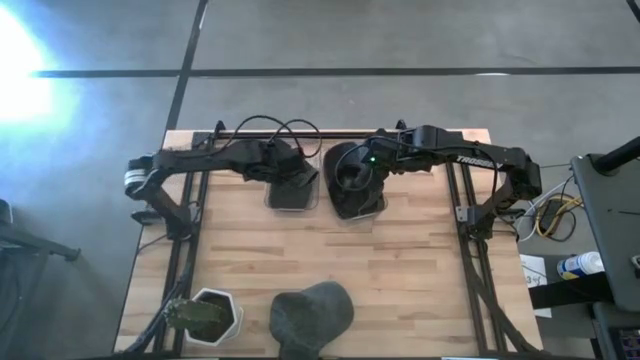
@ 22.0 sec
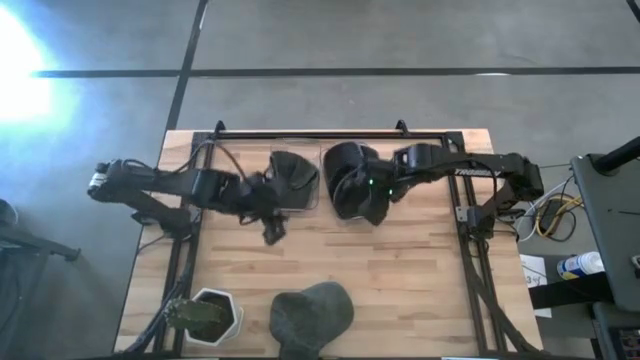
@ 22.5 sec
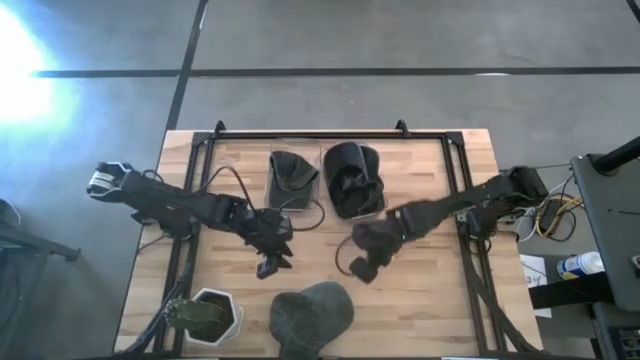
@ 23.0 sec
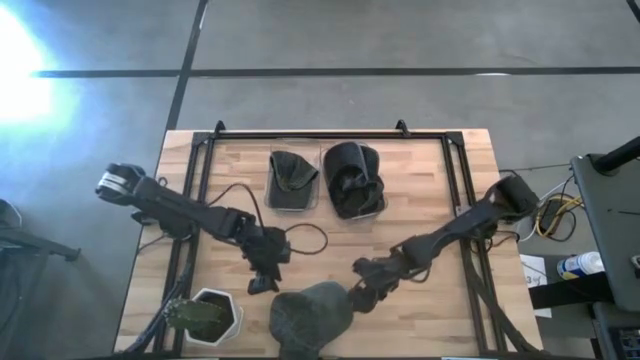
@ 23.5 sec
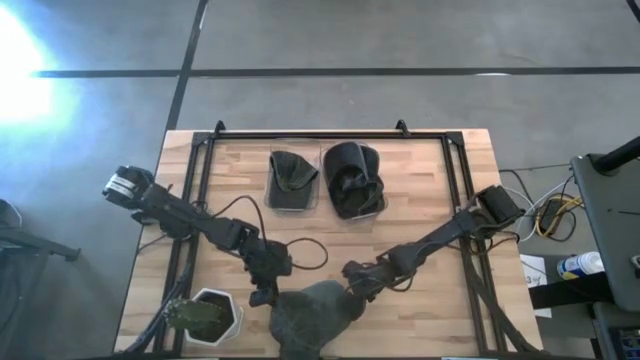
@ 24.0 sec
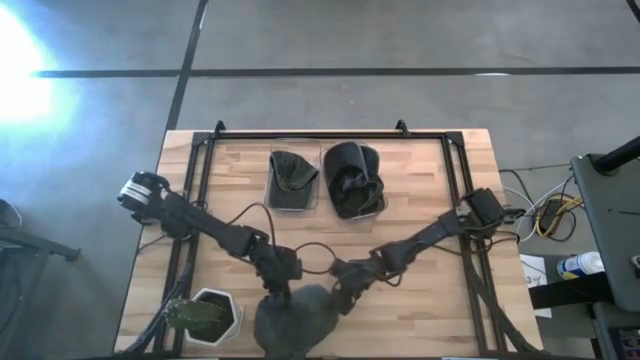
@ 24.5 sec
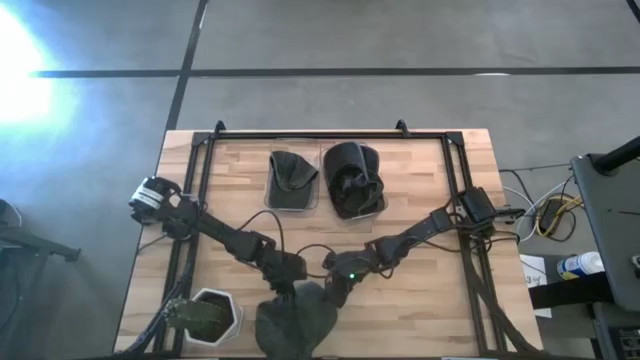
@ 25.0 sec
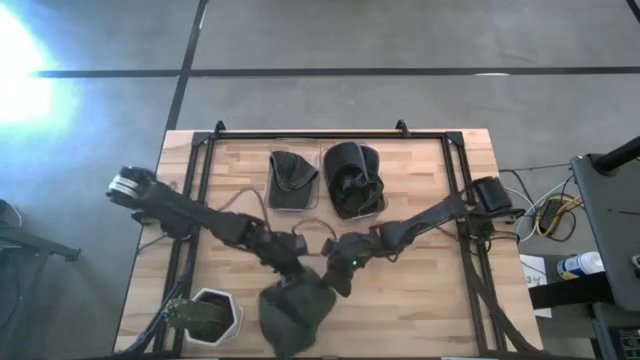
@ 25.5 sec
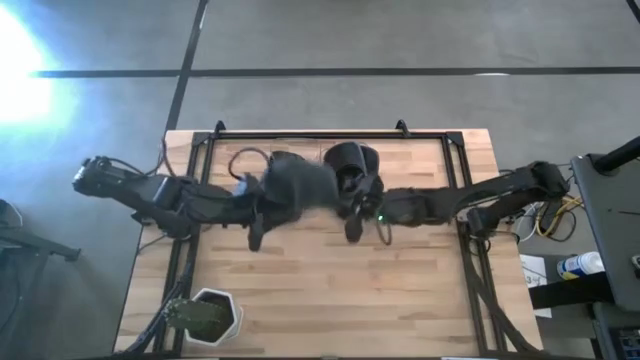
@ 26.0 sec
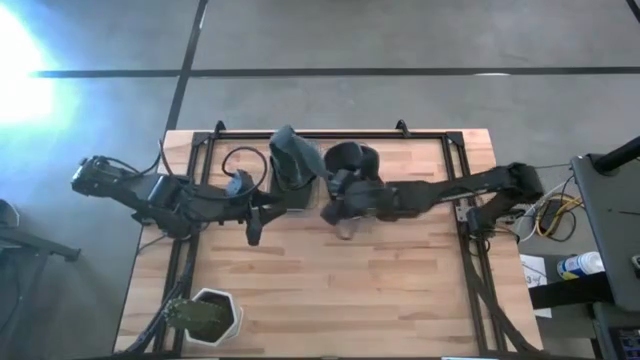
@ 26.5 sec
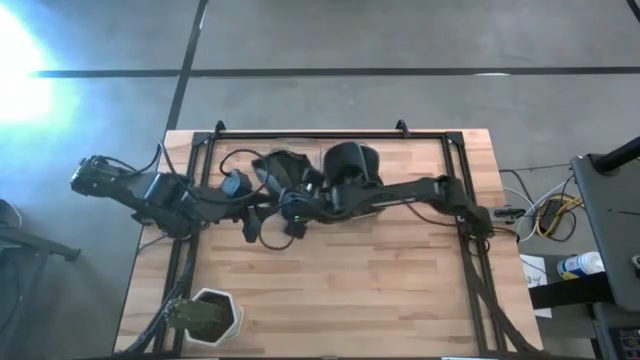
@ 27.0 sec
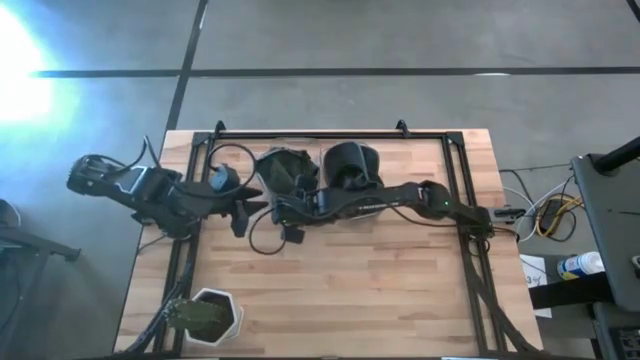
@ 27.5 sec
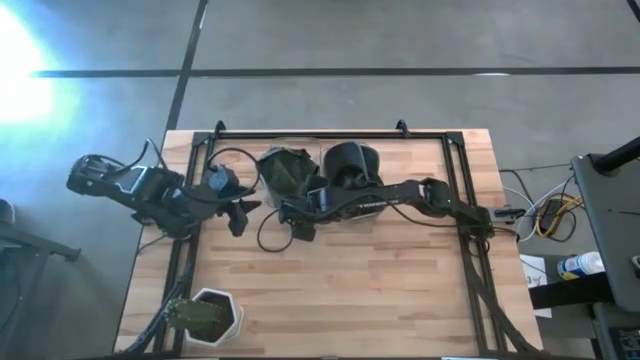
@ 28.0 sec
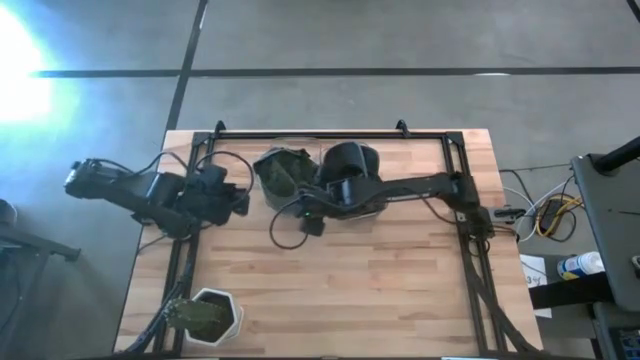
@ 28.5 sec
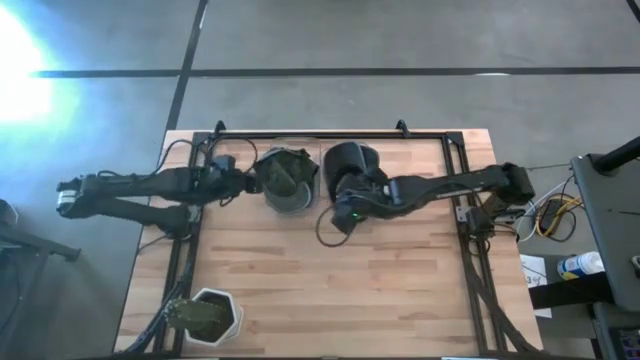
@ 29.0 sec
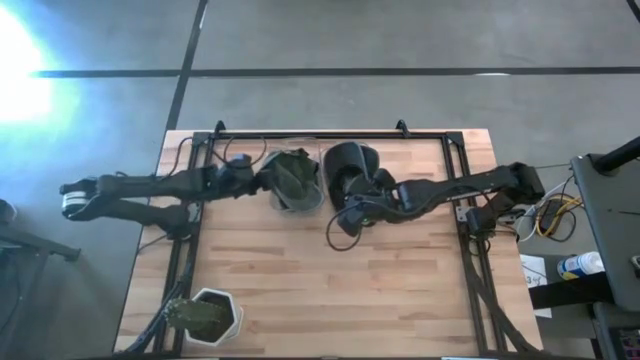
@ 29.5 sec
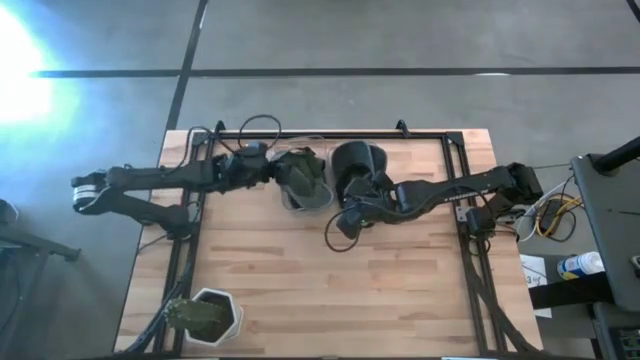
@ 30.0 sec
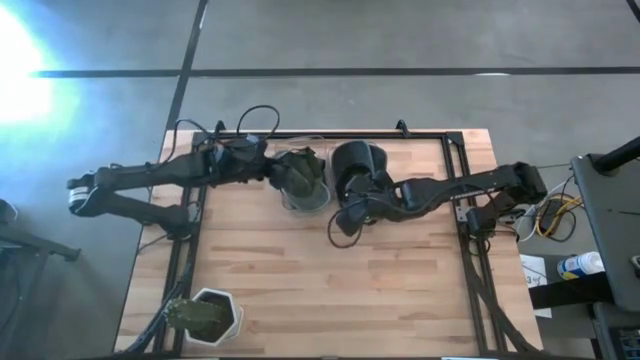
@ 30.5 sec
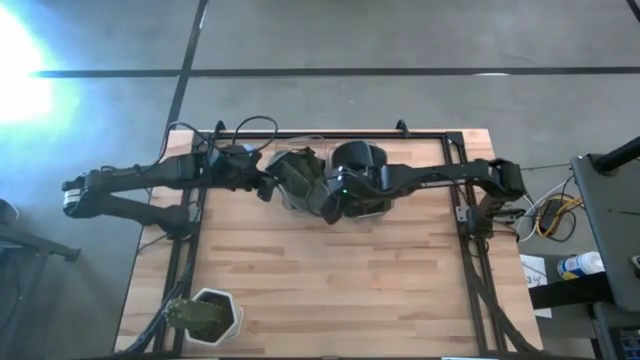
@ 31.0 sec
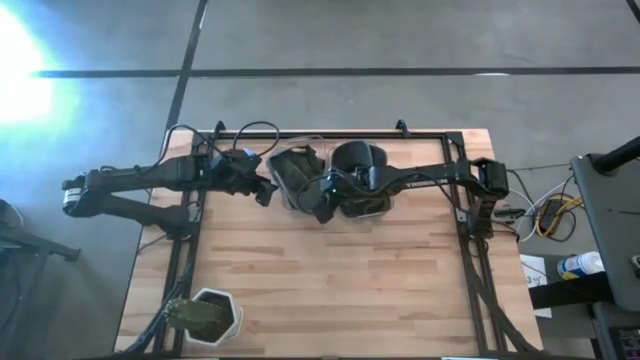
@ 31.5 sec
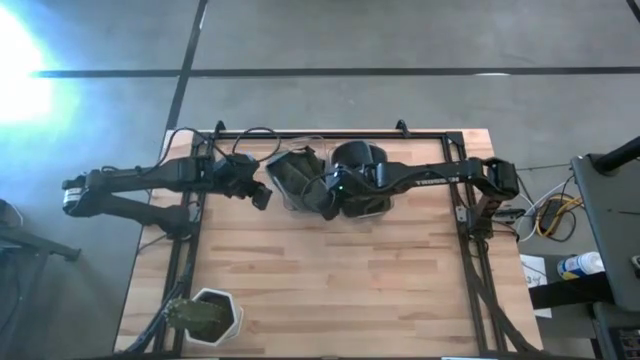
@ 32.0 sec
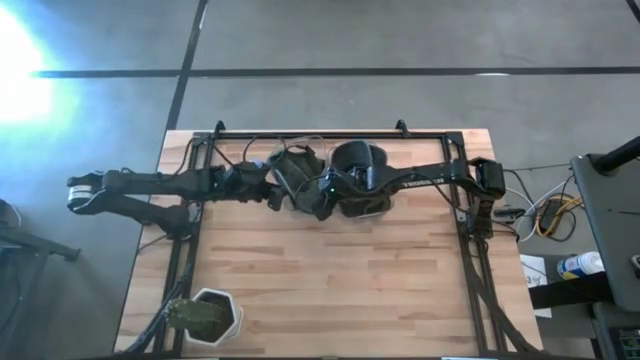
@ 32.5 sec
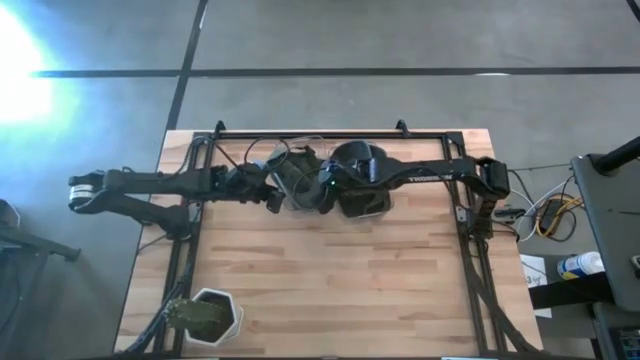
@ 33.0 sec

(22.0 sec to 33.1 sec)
Task: Pick & Place hat
Put the dark green cap into the left transparent bin

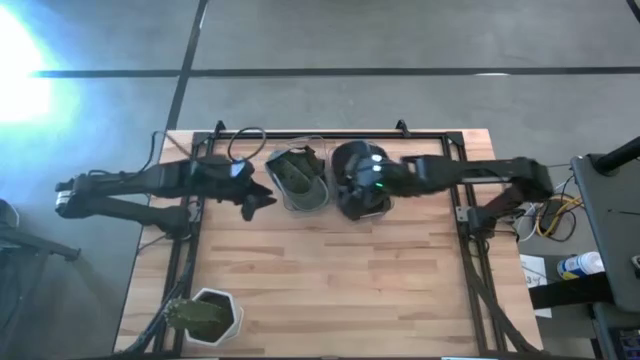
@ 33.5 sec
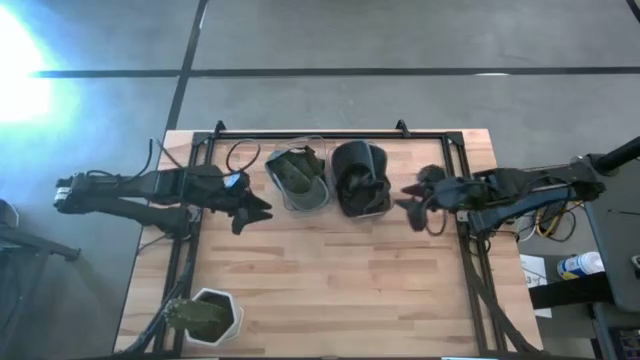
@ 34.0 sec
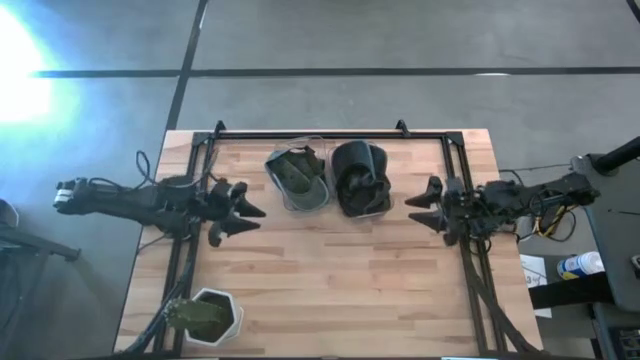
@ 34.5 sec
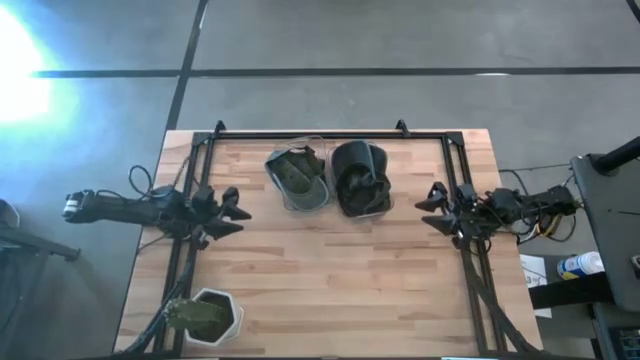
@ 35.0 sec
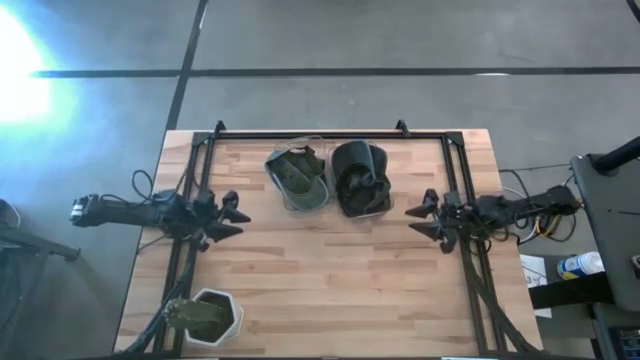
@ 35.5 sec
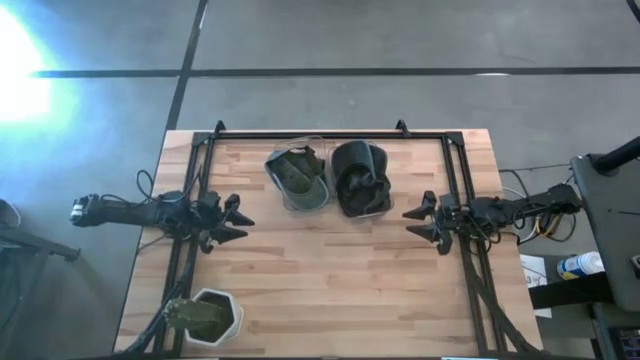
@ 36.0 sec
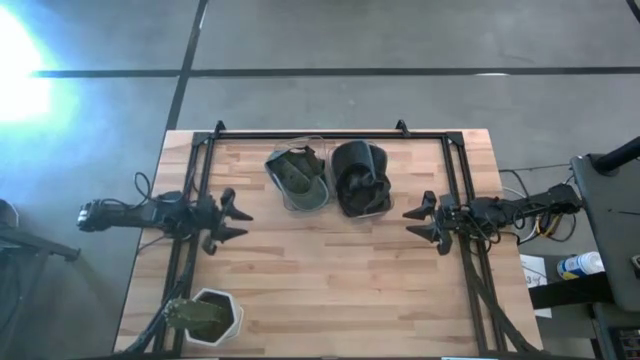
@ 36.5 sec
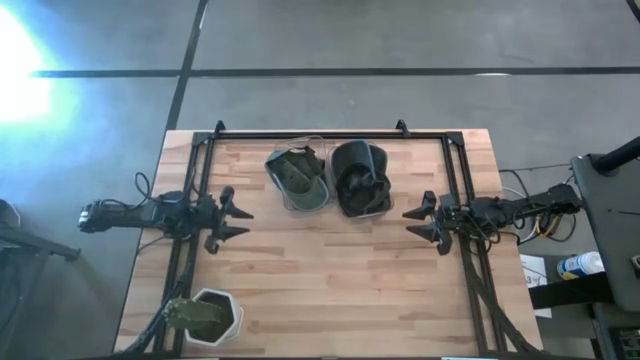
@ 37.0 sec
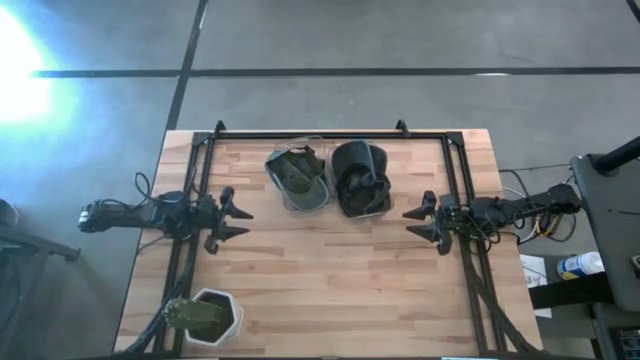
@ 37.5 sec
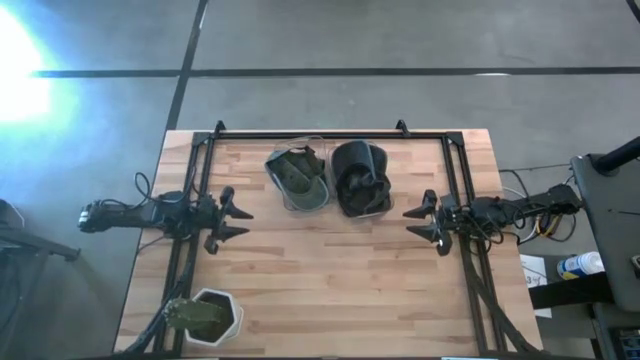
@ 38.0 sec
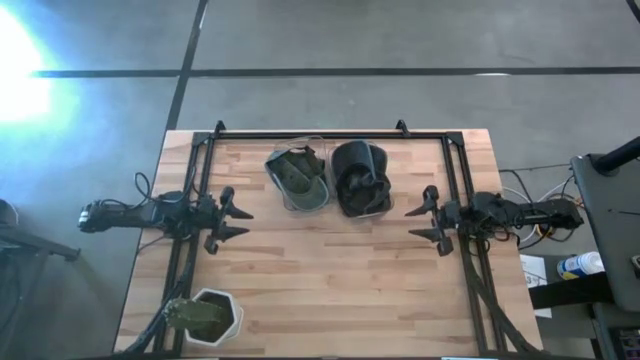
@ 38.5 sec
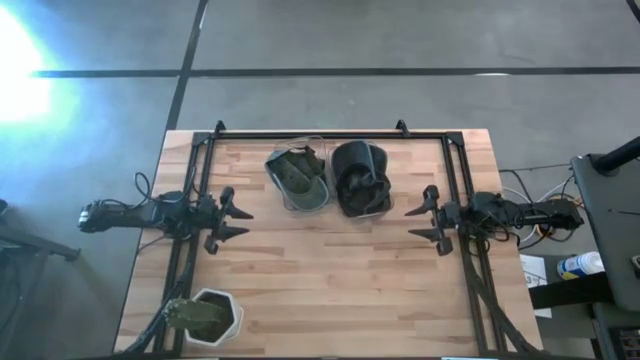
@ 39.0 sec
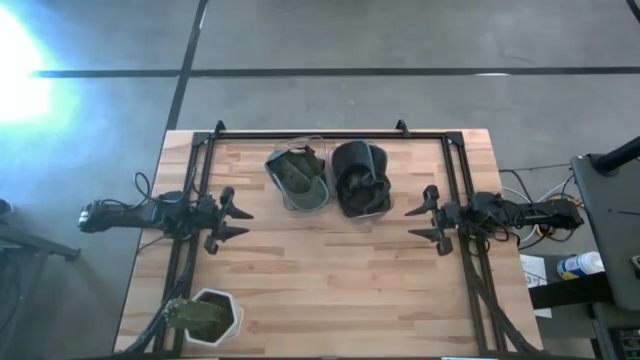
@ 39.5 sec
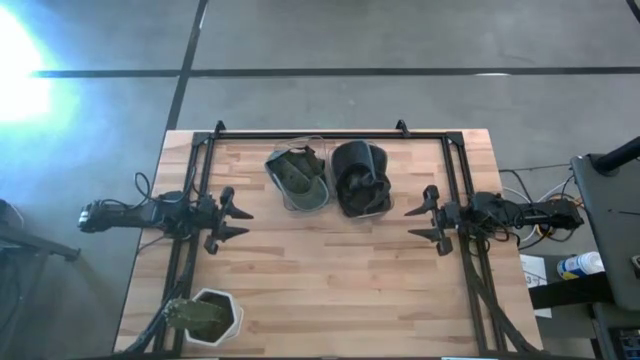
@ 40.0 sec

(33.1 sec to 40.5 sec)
Return to Home Position
